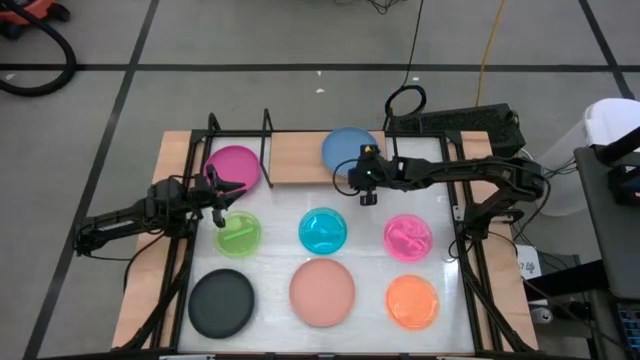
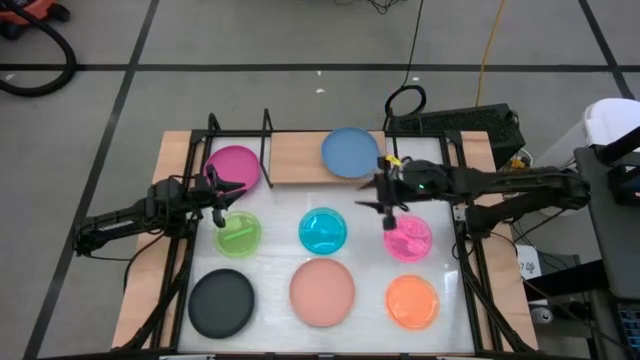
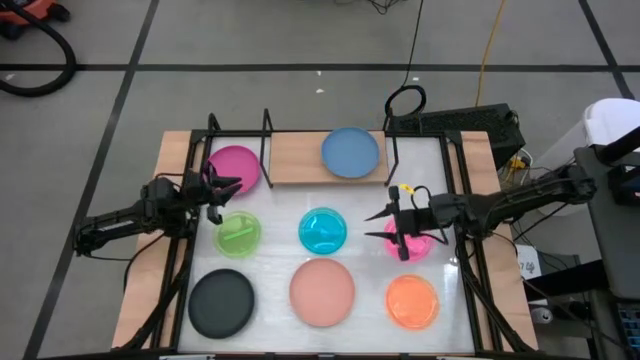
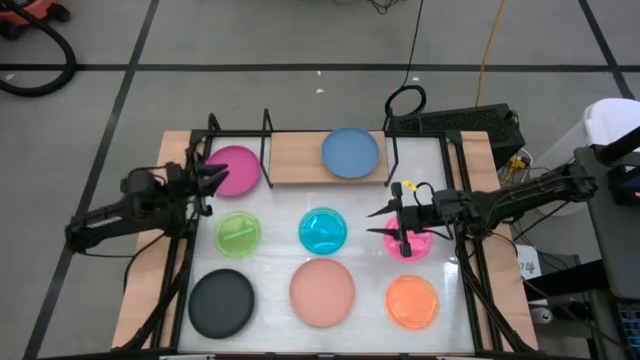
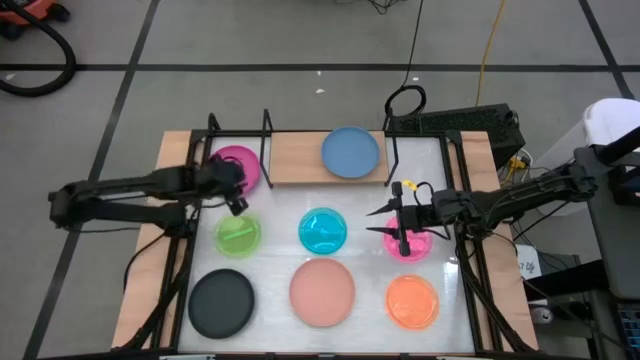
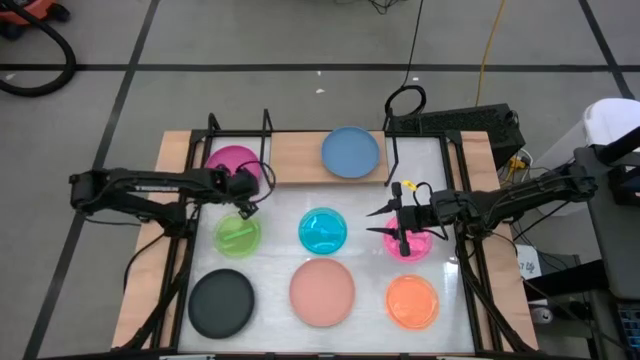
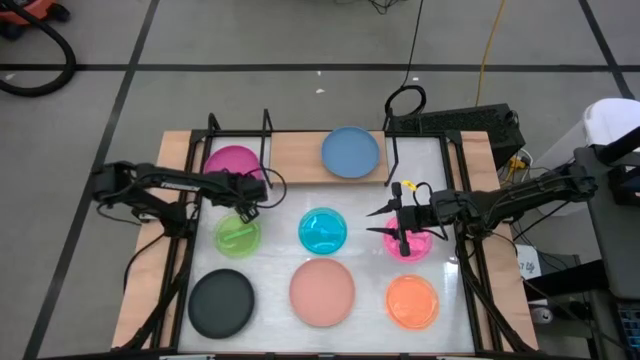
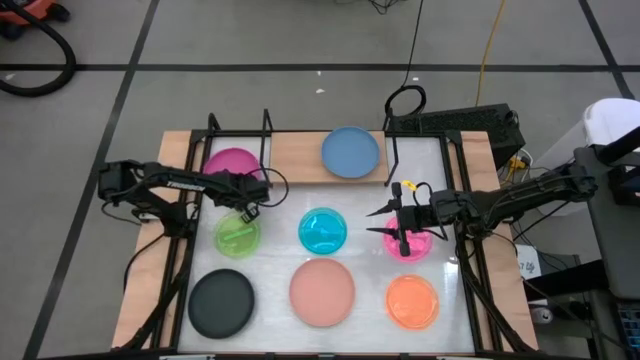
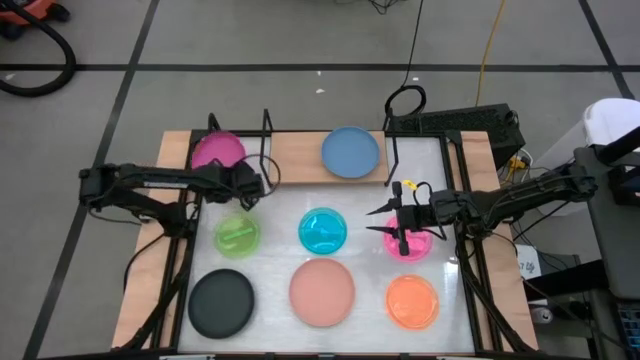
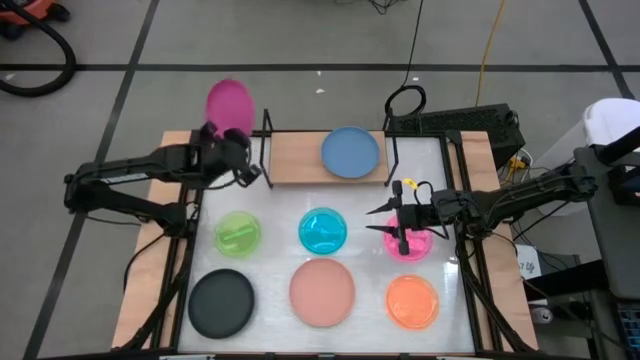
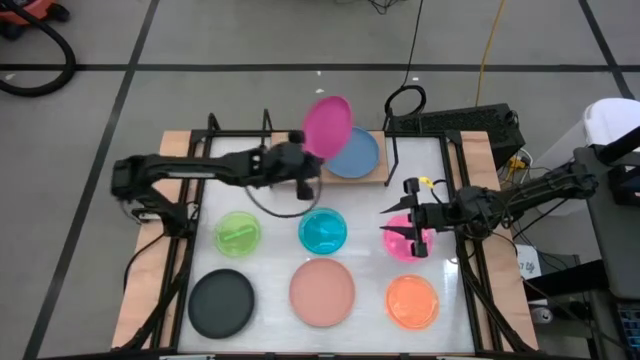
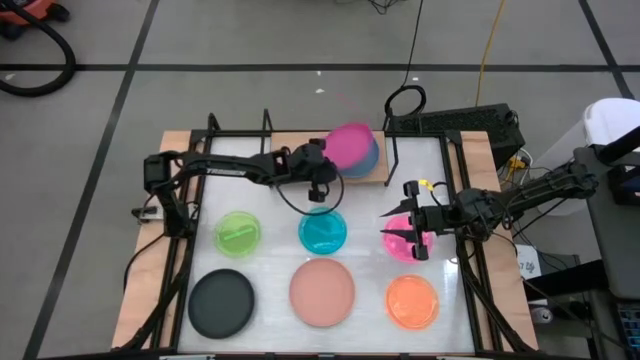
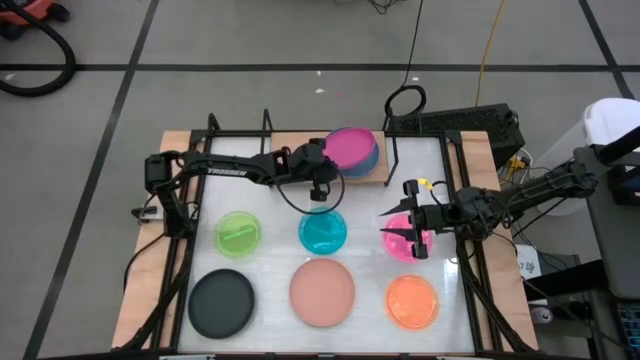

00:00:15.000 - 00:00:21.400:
Task: Place and stack plates onto a shelf
Stack the large pink plate on top of the large blue plate on the shelf

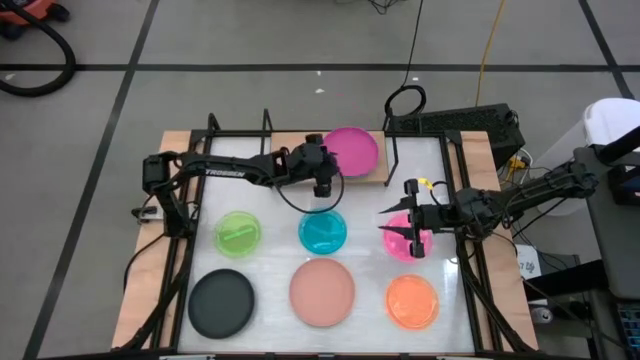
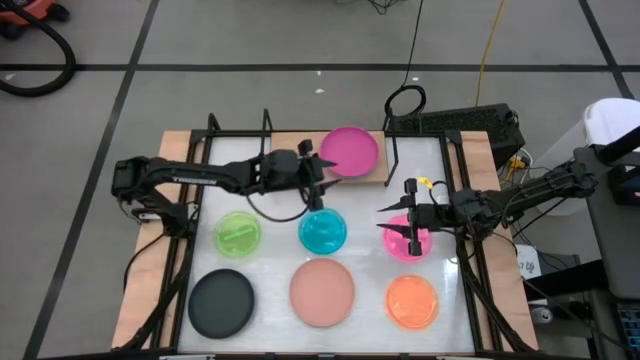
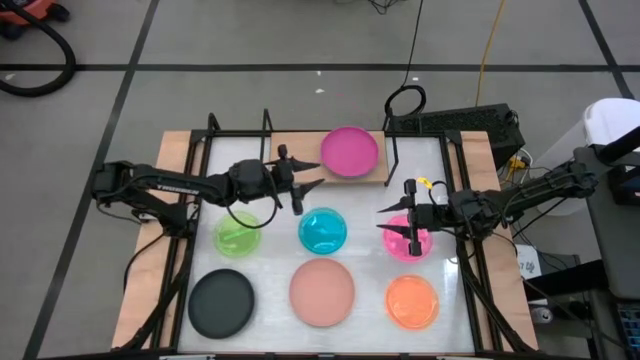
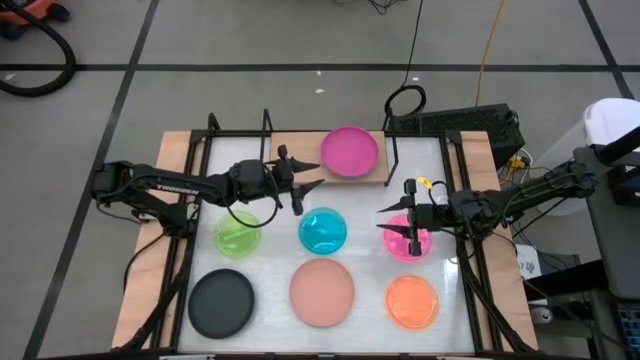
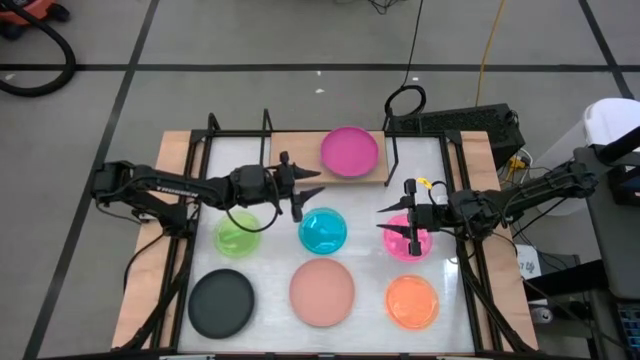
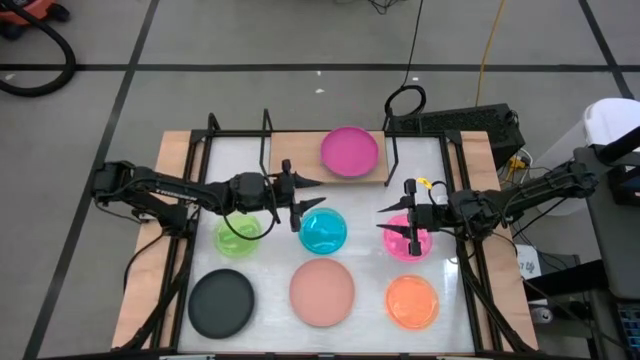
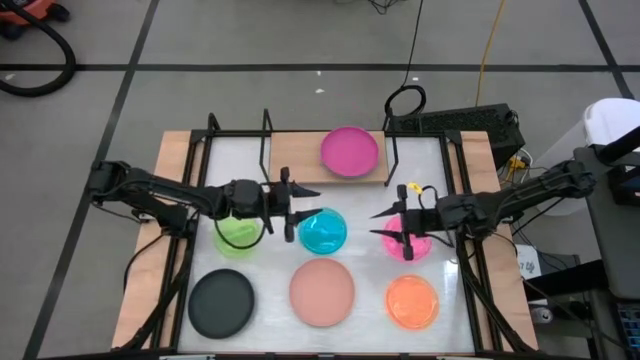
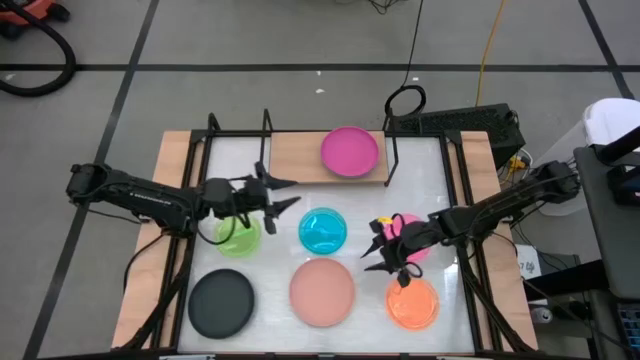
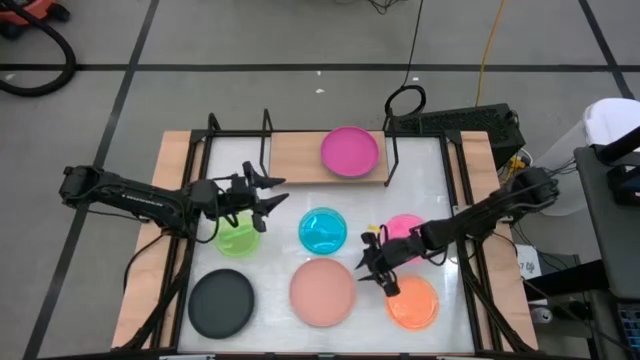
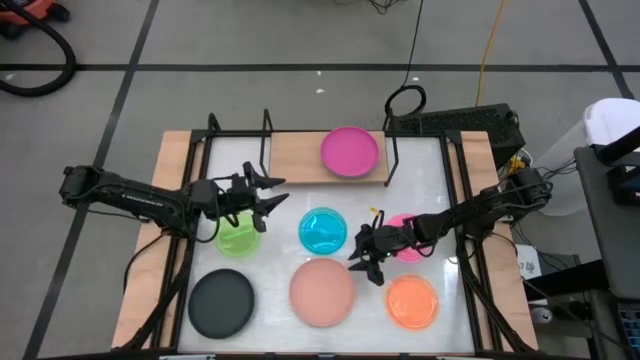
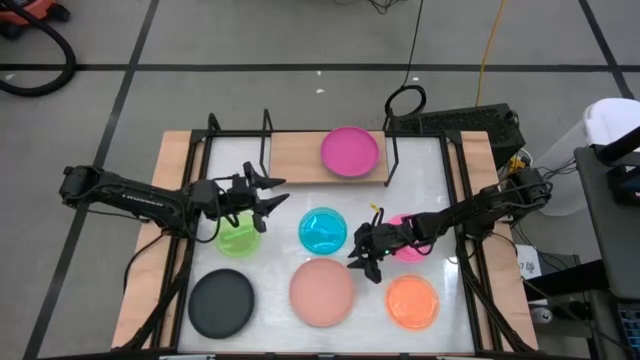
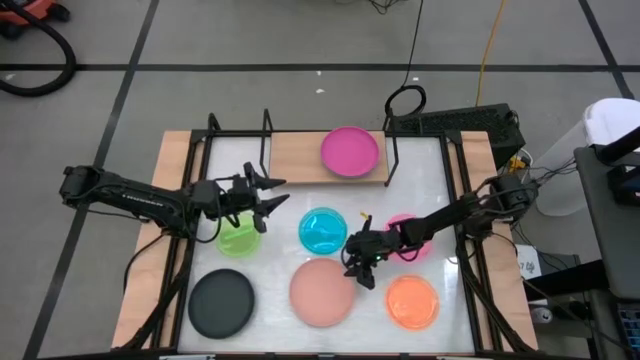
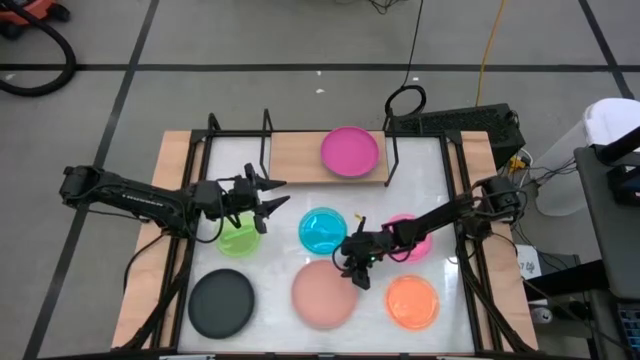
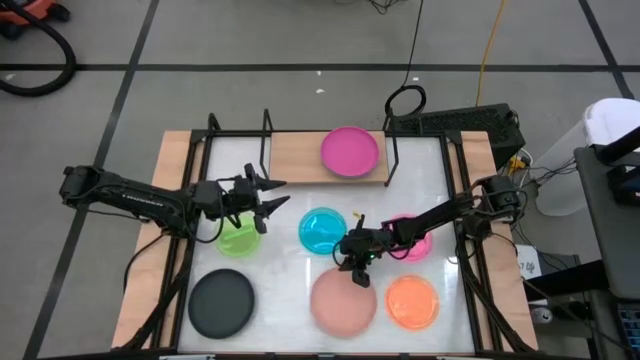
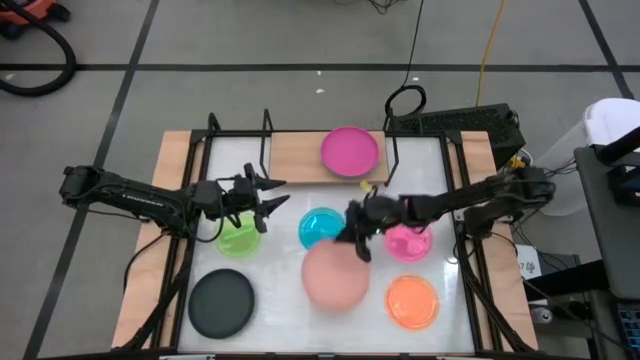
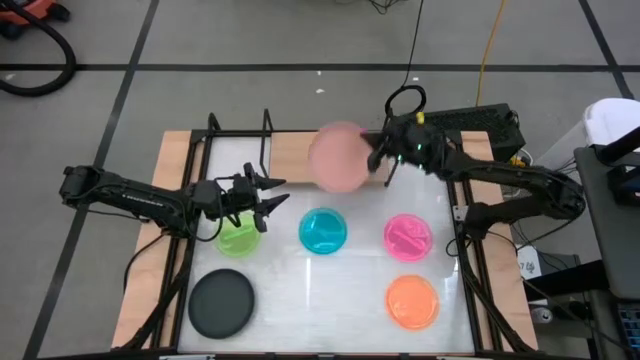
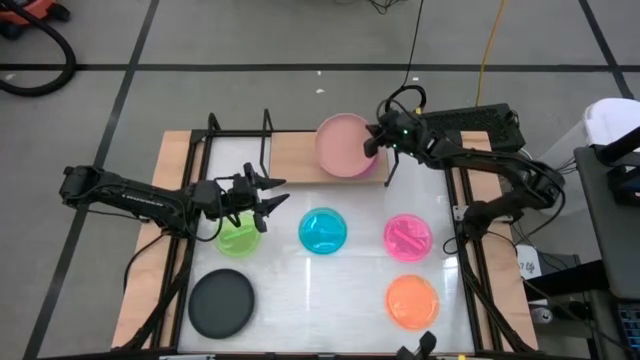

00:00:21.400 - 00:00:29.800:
Stack the large light orange plate on top of the large pink plate on the shelf

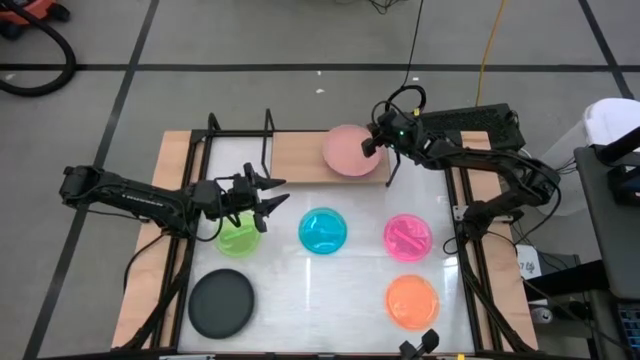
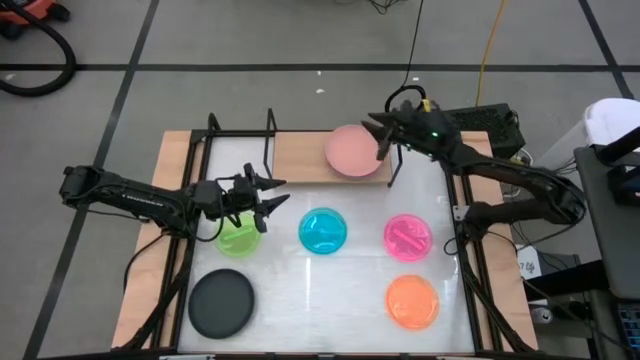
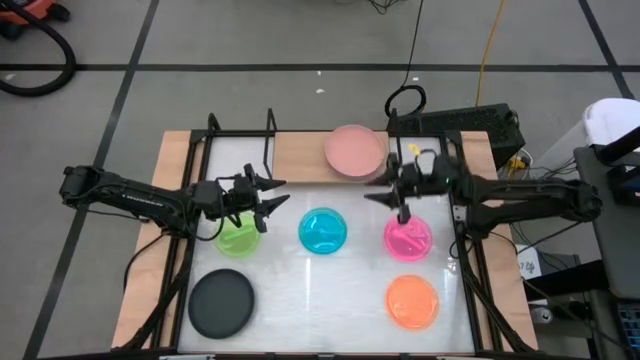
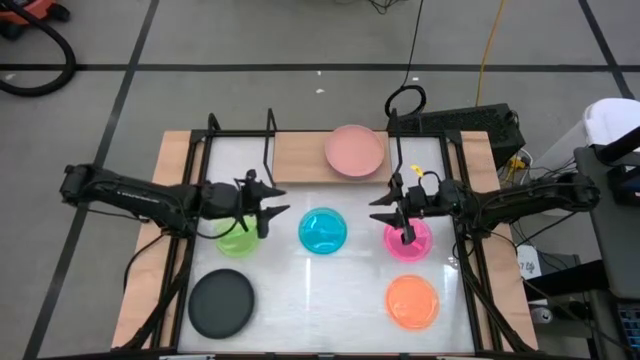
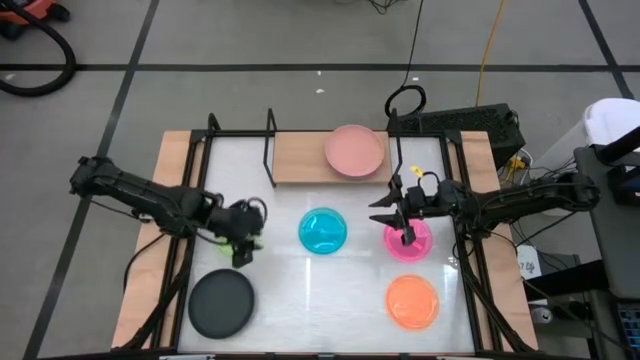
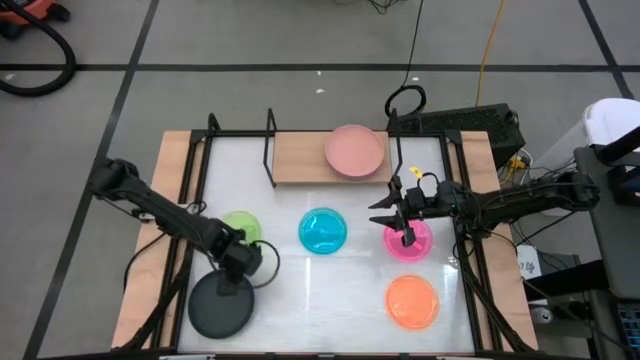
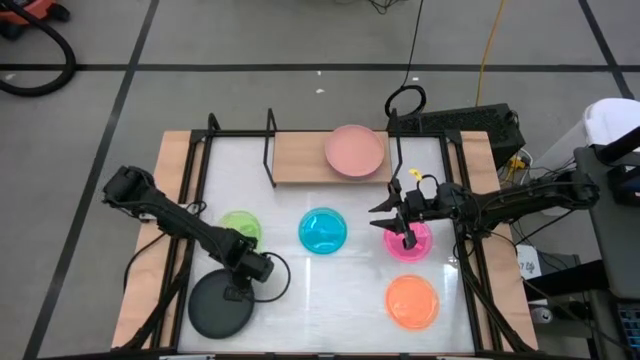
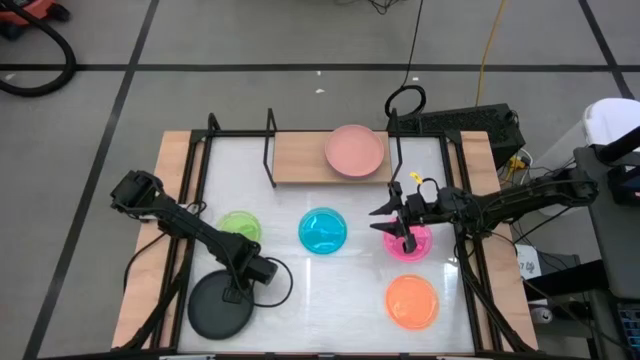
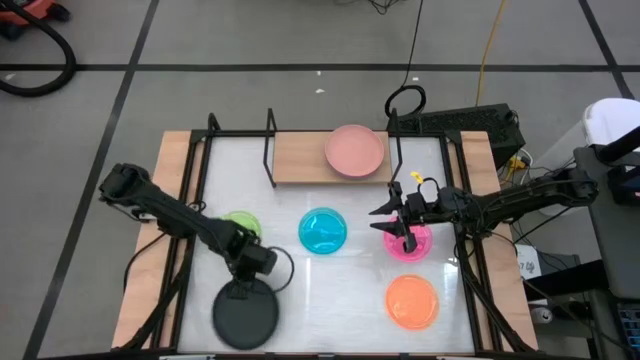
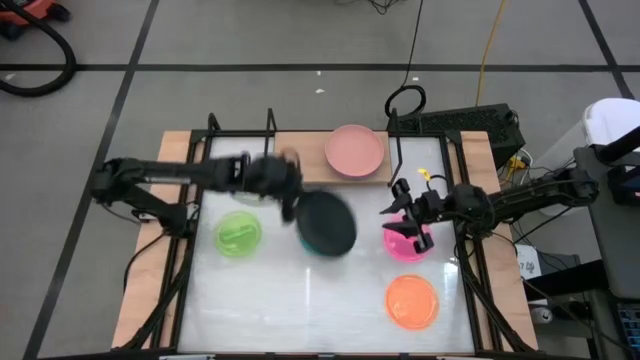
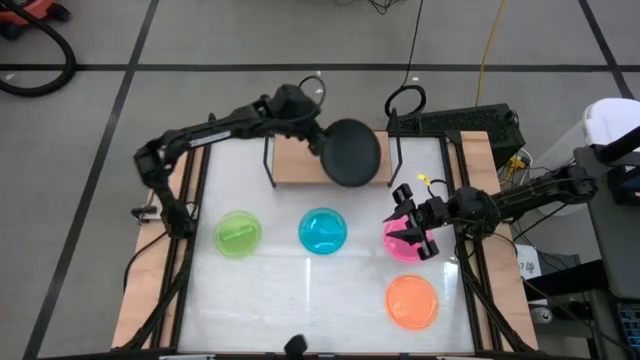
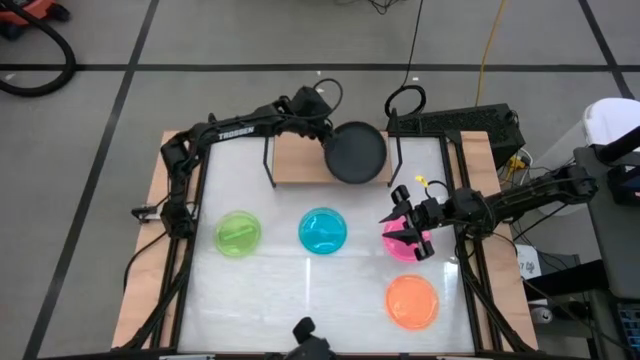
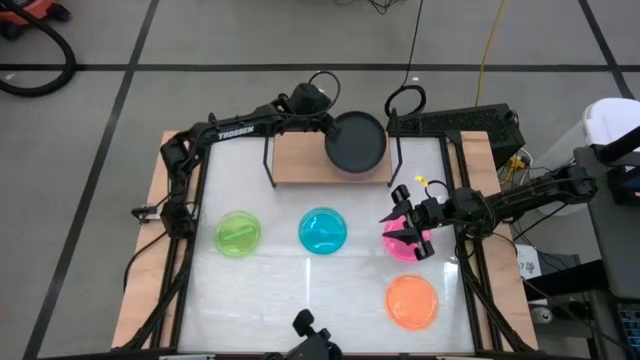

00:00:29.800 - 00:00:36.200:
Stack the large black plate on top of the large light orange plate on the shelf
